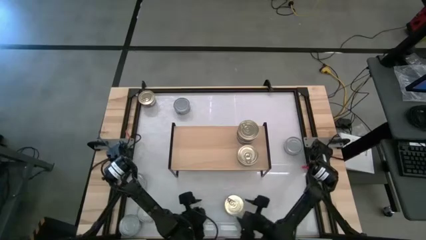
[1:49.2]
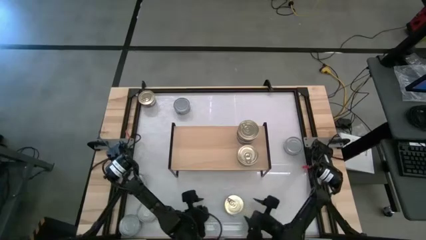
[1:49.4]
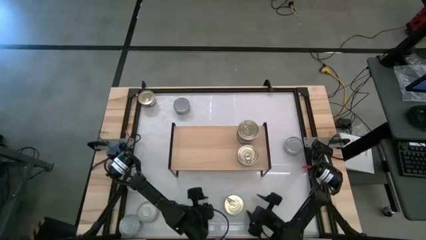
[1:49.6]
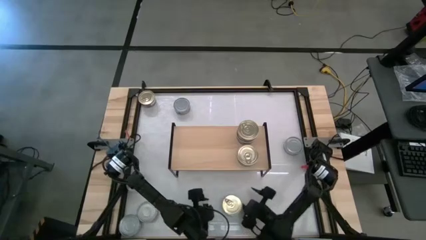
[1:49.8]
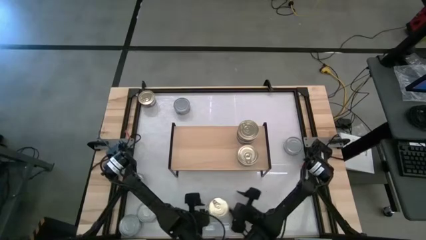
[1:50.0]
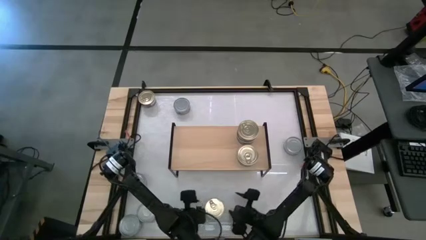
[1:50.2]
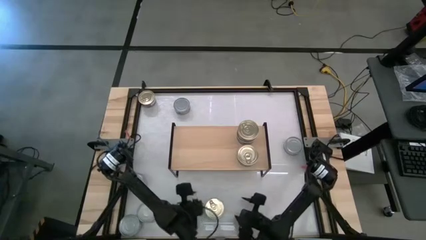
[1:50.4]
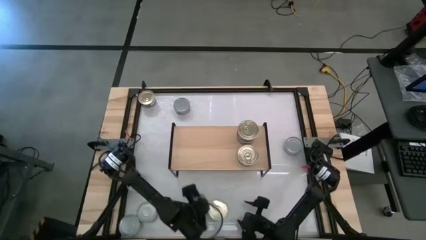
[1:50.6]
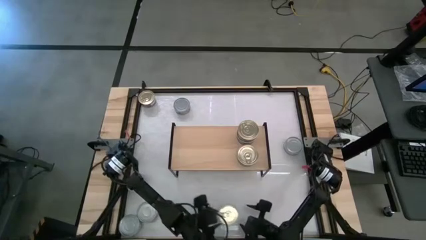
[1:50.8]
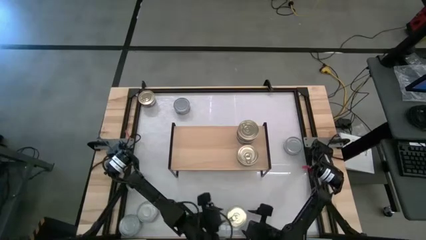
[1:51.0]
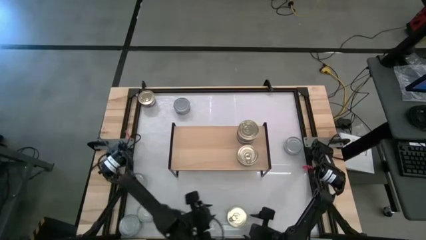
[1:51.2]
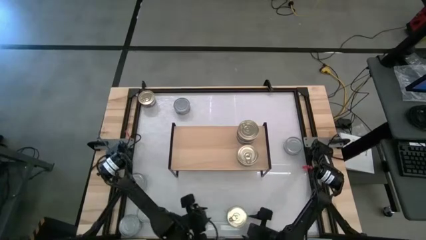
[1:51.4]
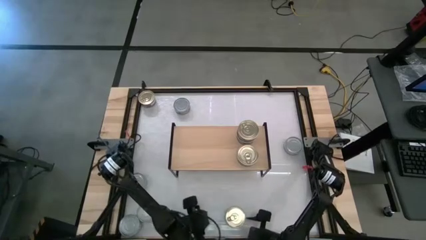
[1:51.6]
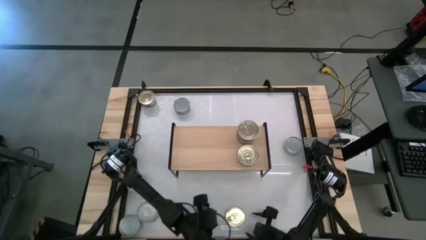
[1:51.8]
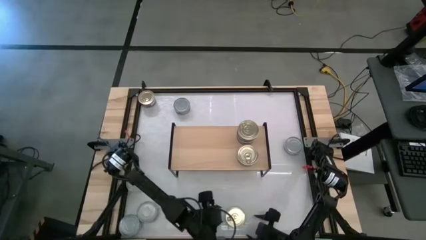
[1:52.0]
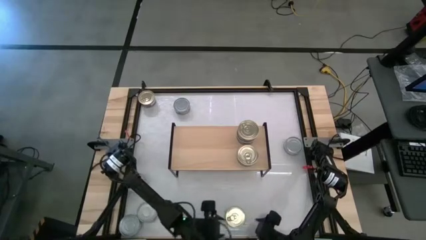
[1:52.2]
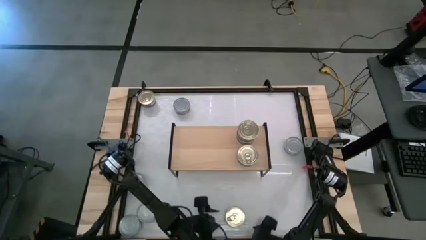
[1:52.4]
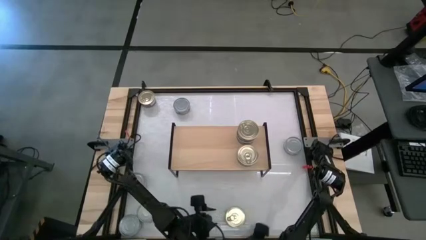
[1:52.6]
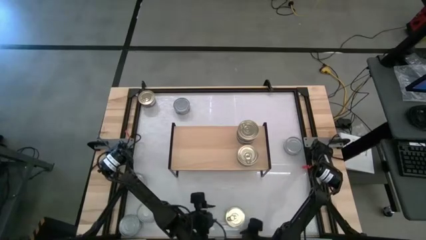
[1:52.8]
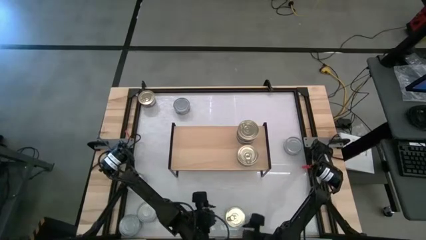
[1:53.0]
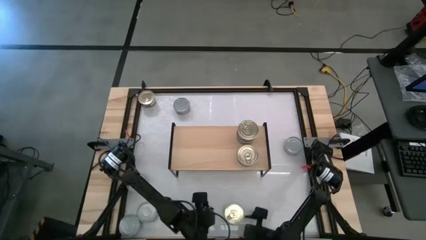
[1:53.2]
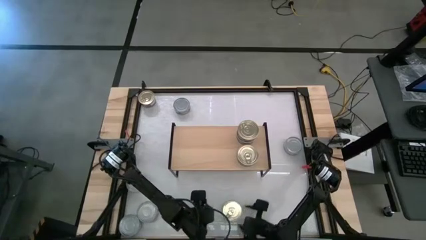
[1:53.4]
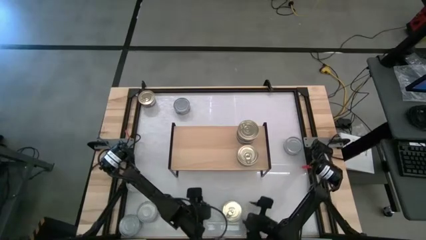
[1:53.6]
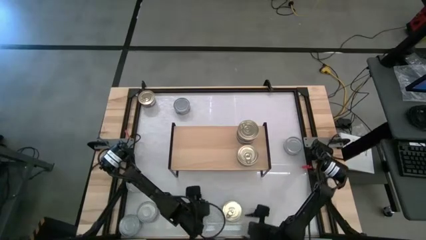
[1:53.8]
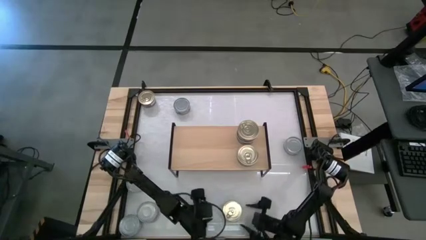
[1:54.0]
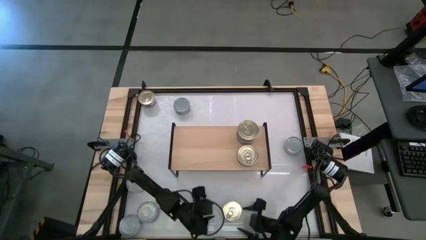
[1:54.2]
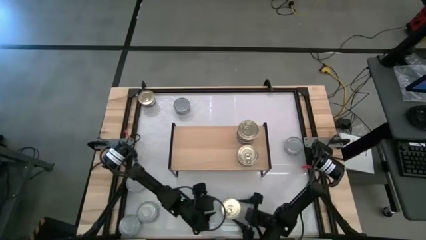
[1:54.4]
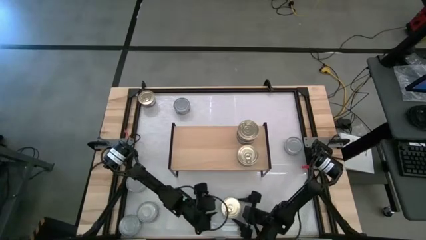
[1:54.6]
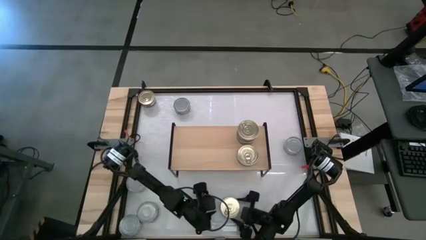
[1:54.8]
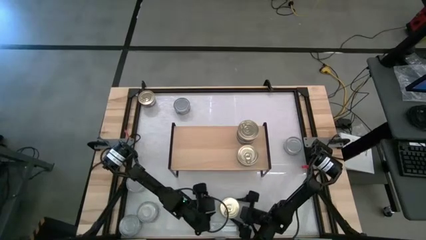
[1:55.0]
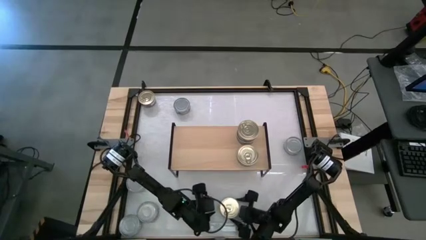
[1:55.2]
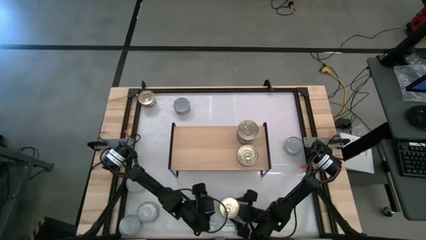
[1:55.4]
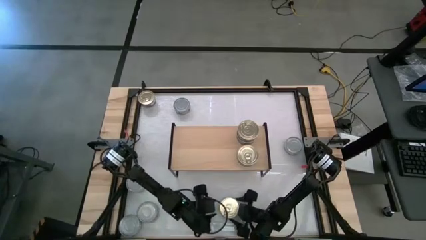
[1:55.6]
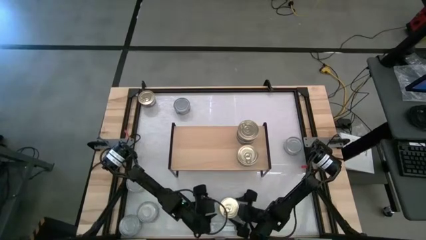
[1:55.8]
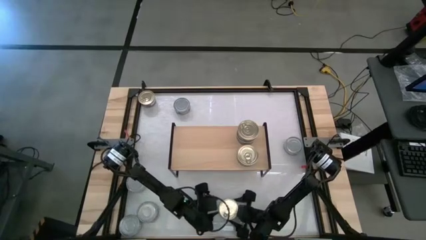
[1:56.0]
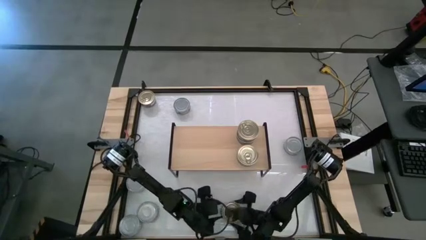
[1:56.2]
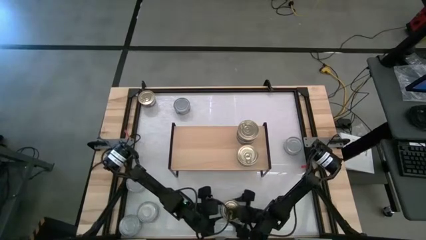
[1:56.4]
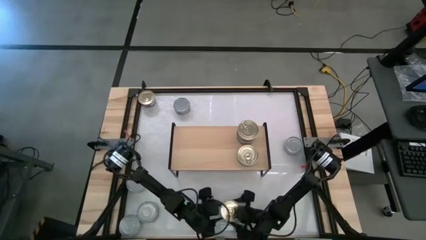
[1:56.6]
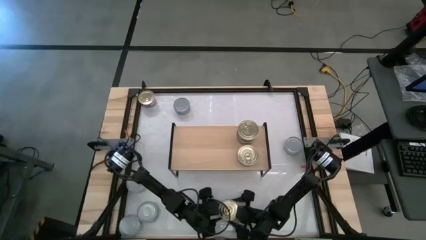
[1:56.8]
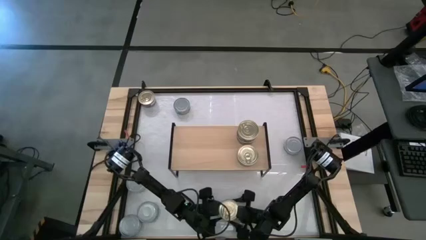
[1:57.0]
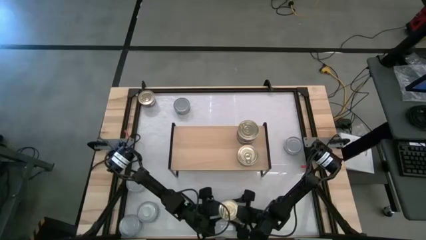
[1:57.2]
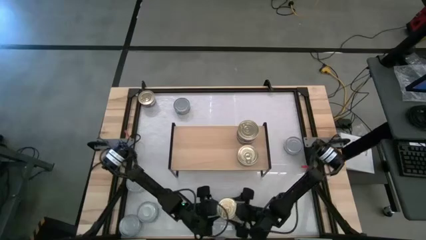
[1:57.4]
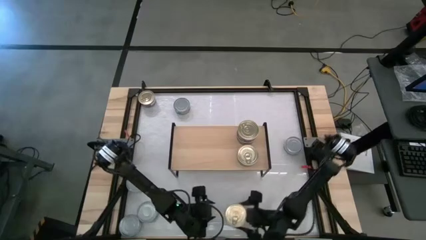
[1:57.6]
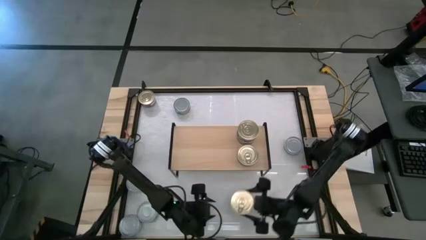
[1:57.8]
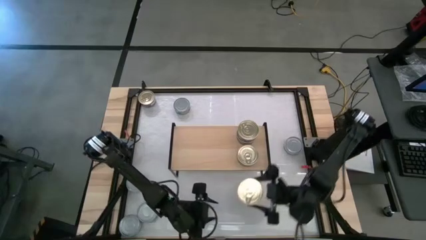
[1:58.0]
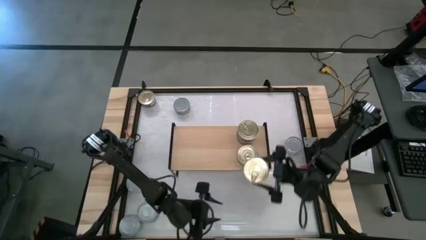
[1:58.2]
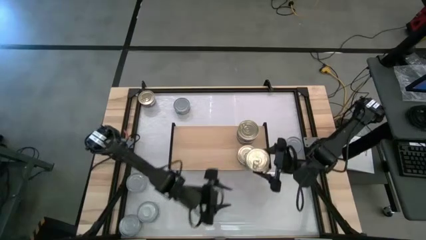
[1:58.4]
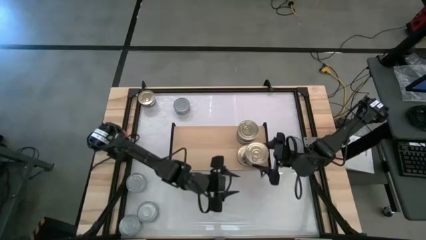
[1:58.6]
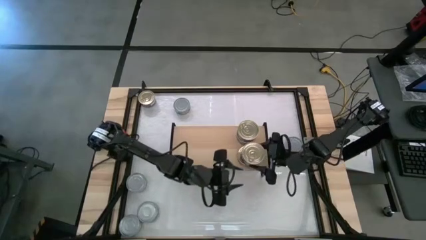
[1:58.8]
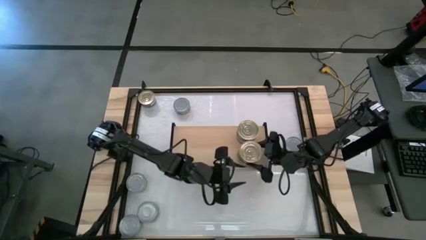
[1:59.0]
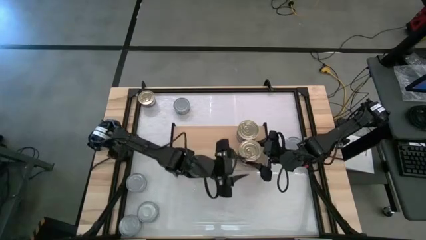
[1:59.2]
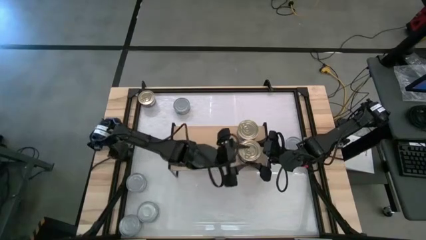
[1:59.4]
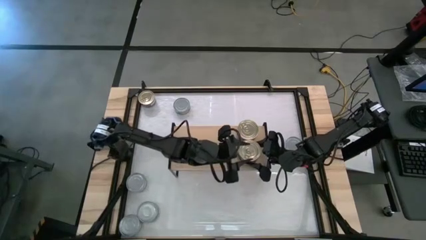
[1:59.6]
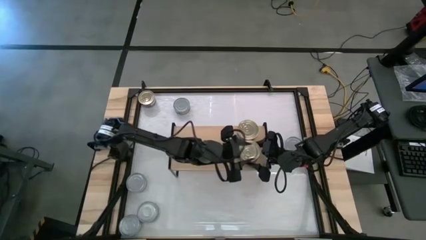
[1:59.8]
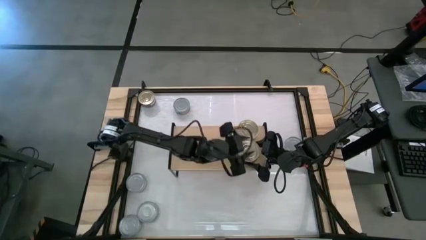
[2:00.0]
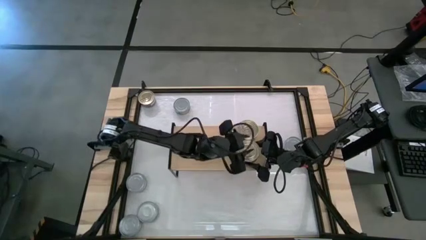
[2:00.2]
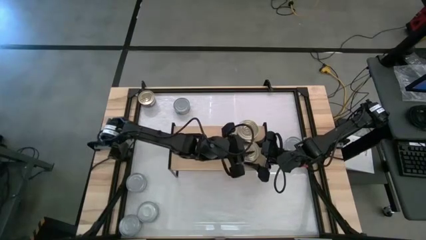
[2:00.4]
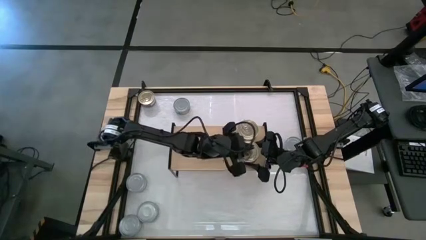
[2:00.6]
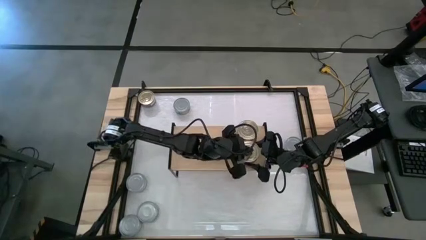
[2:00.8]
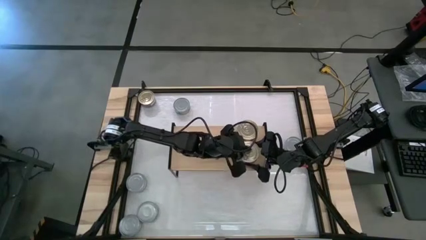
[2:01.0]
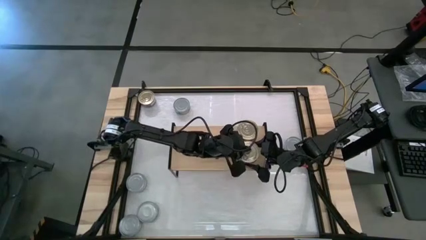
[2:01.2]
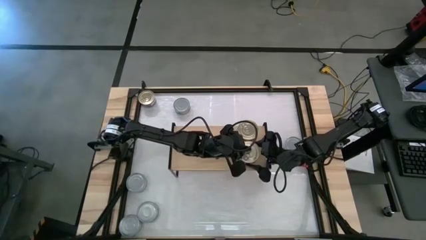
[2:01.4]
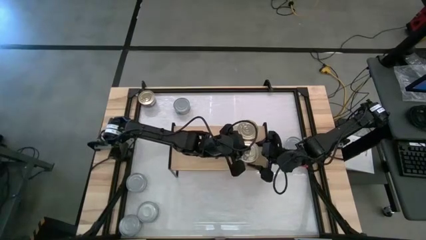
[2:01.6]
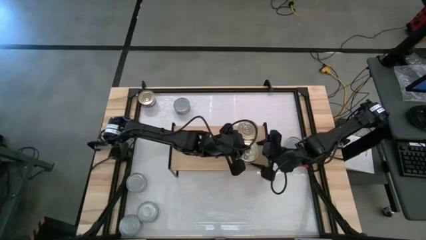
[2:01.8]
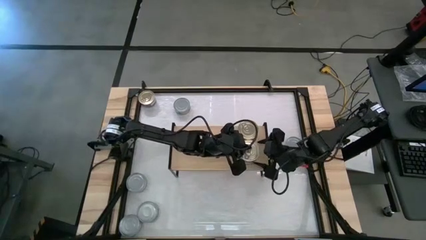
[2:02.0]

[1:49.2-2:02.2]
Task: Stack canned seafood by type on shelf
Stack the blue-pink tuna can on top of the other blue-pink tuna can on the shelf
